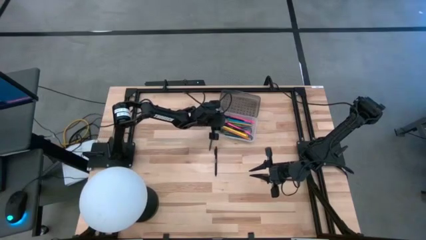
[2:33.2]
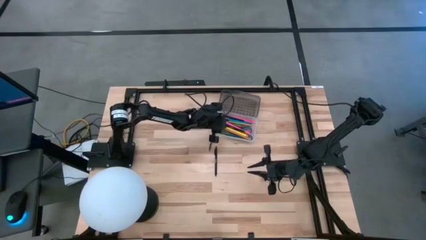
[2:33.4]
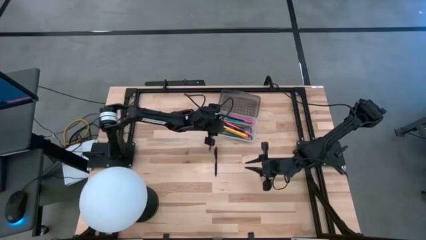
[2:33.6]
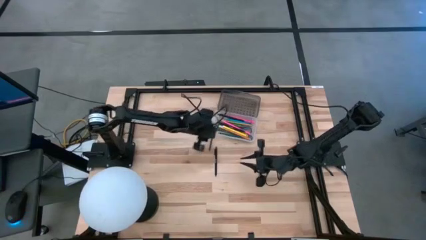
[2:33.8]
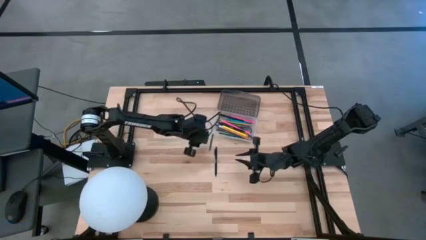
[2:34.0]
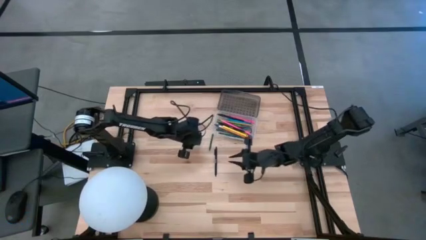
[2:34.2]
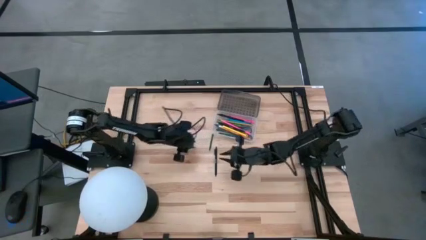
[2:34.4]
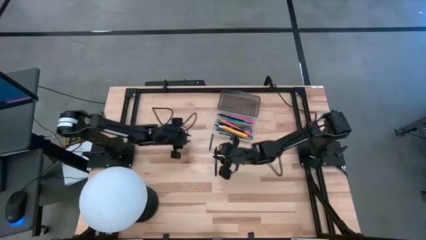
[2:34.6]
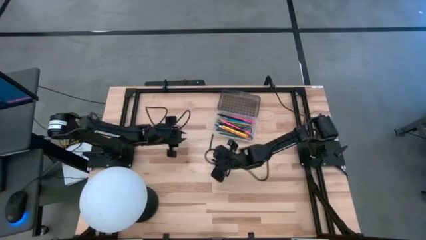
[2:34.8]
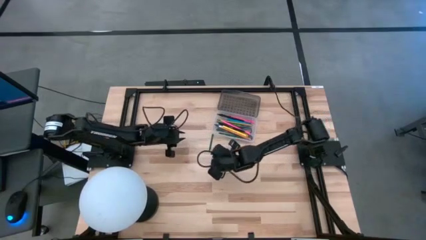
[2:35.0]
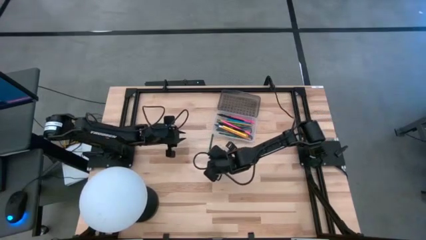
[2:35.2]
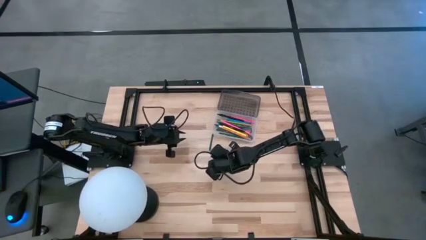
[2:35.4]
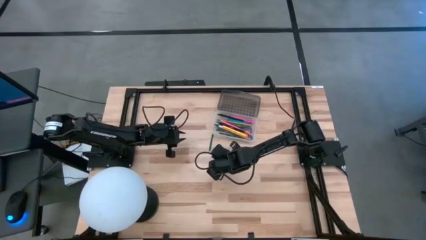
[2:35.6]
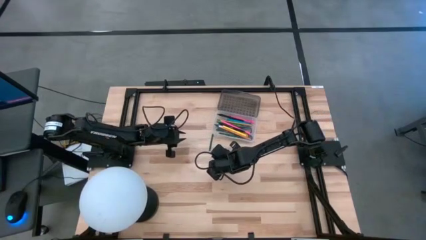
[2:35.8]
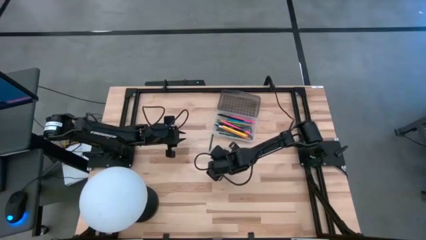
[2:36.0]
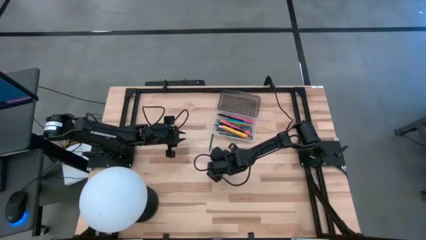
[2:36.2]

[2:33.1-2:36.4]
Task: Pick & place school supplies into a supply box
Put the black pen into the black supply box

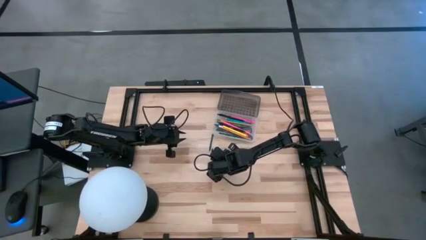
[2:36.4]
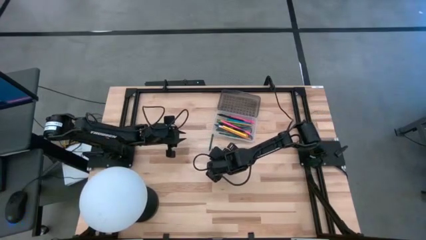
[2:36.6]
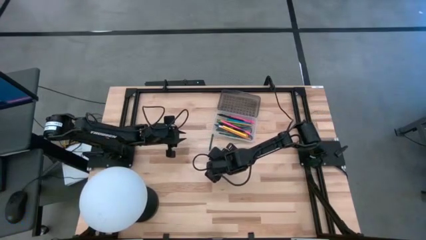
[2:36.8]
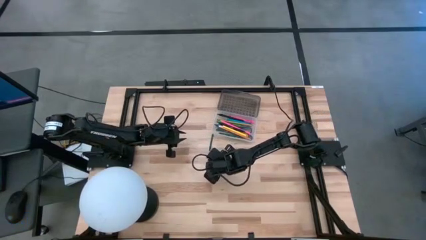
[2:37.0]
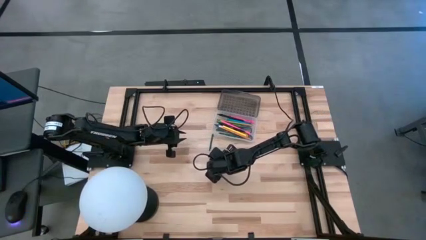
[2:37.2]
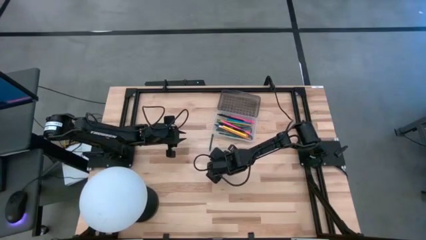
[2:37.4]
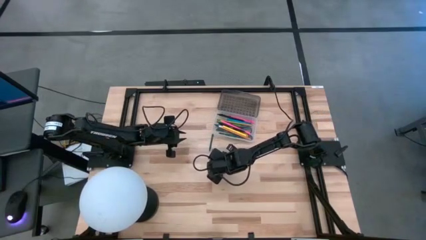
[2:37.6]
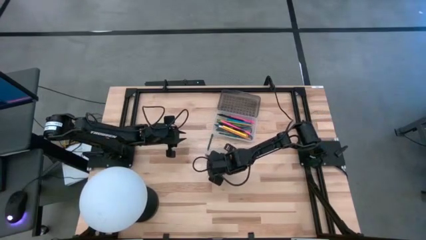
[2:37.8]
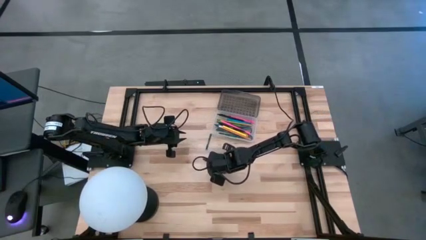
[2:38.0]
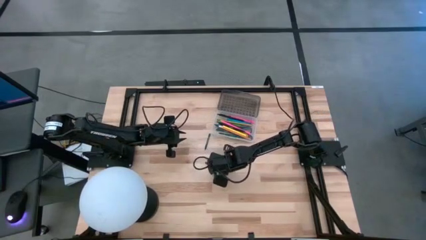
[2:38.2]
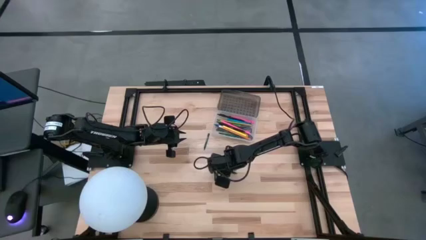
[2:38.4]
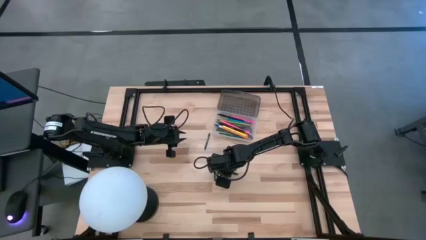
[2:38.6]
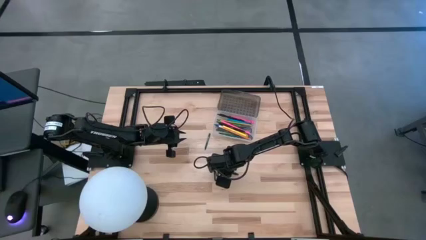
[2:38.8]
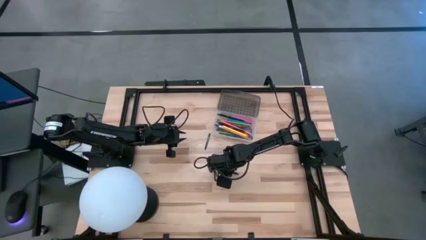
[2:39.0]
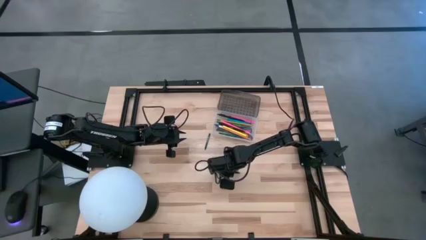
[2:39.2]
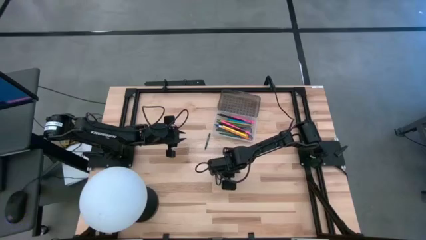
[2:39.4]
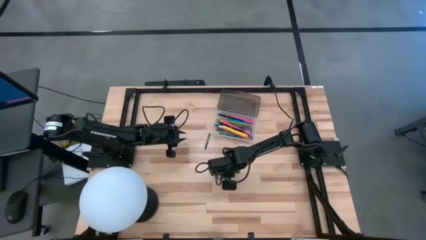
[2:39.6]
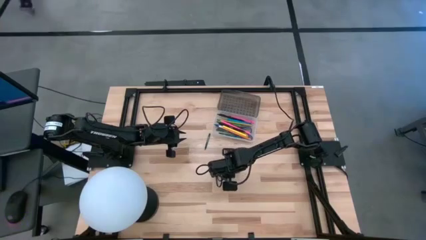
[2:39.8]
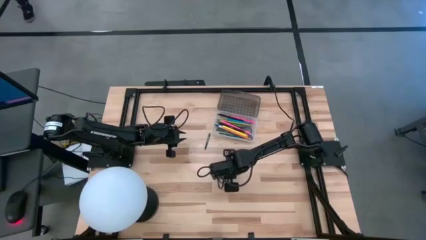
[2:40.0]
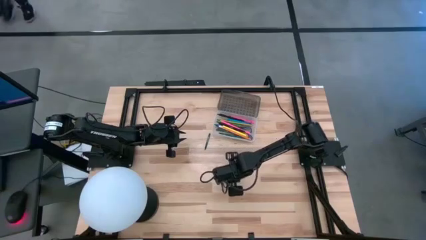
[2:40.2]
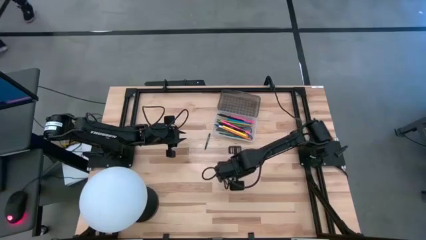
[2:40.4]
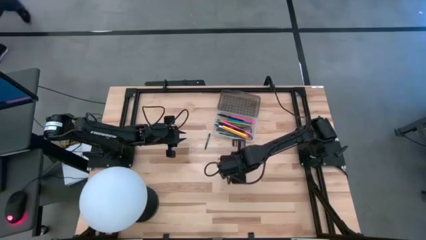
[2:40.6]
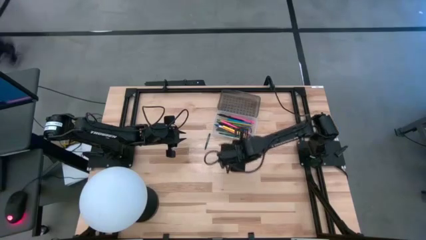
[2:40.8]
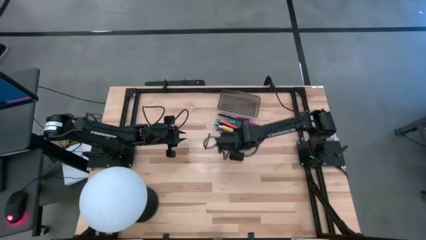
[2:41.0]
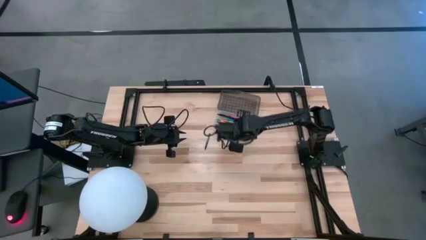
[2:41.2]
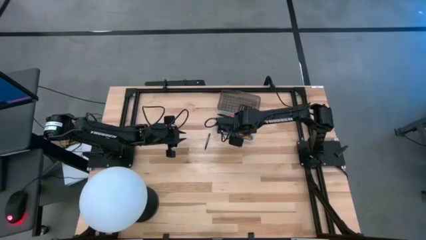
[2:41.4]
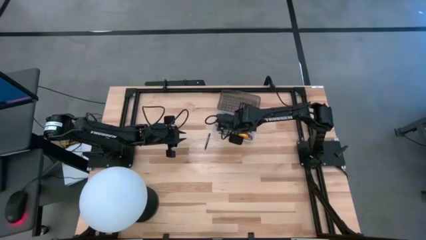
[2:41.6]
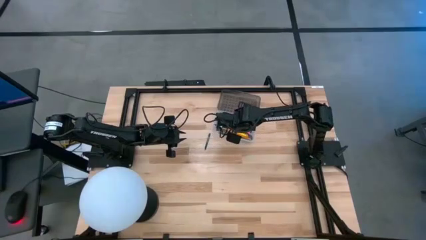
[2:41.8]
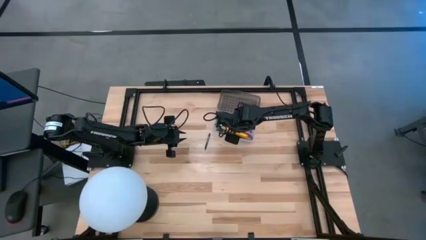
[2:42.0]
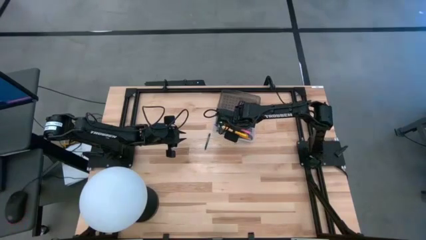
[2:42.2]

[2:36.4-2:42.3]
Put the black pen into the black supply box

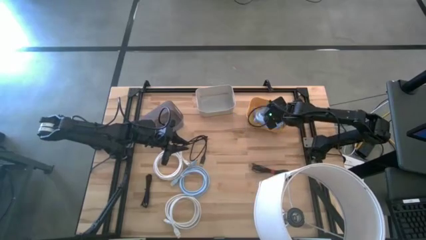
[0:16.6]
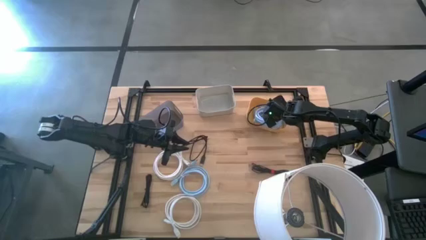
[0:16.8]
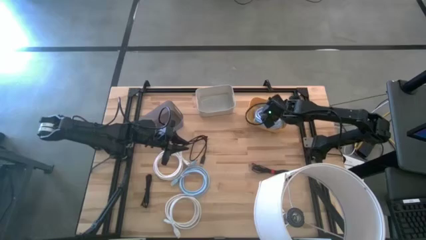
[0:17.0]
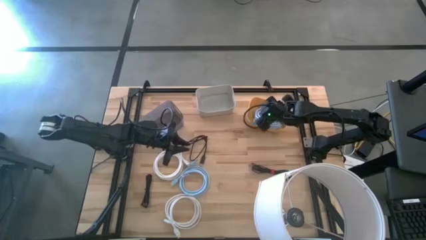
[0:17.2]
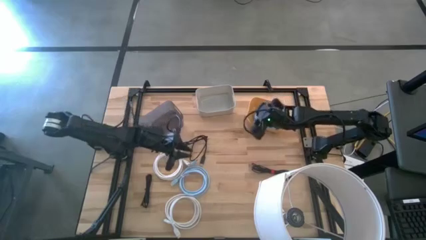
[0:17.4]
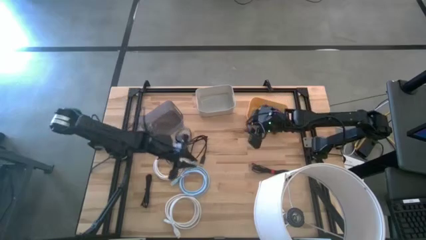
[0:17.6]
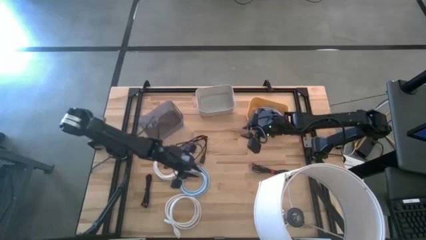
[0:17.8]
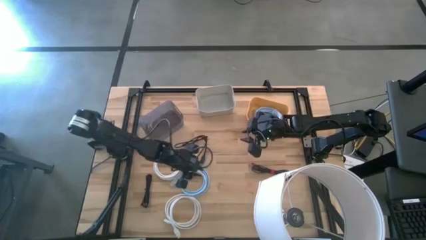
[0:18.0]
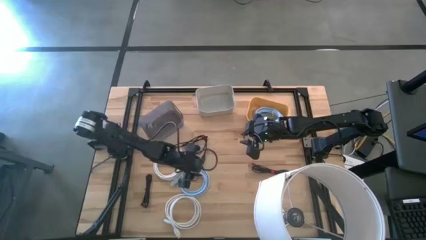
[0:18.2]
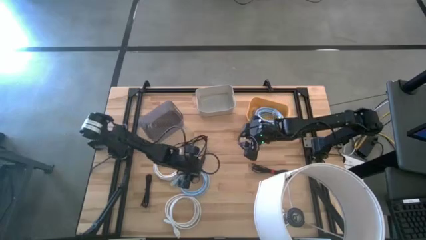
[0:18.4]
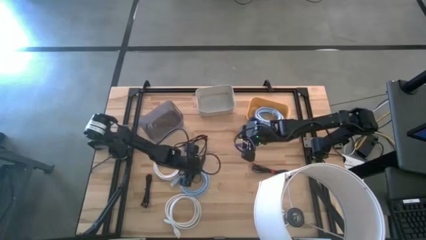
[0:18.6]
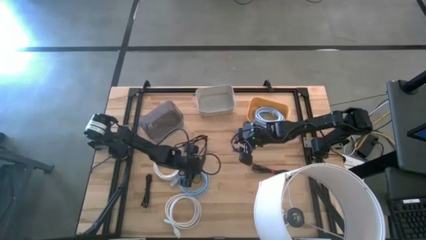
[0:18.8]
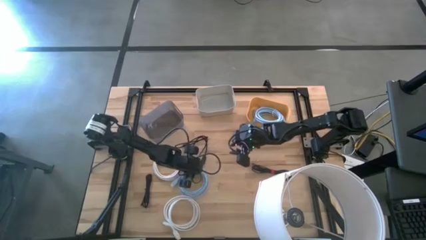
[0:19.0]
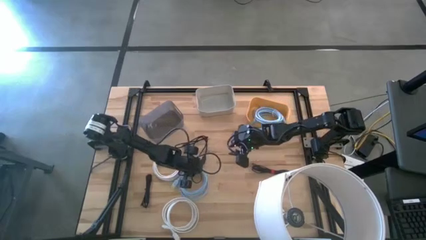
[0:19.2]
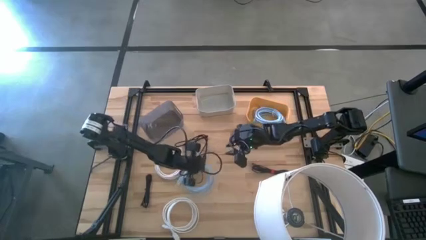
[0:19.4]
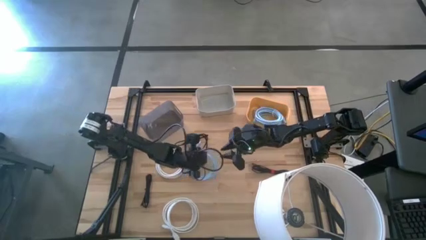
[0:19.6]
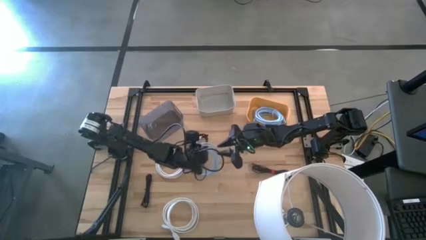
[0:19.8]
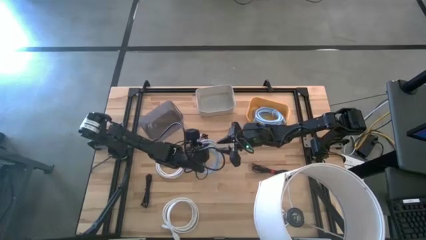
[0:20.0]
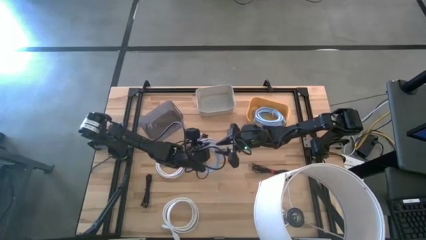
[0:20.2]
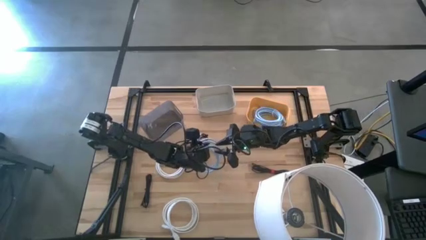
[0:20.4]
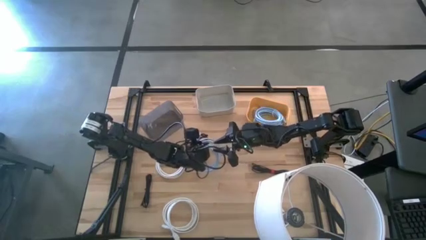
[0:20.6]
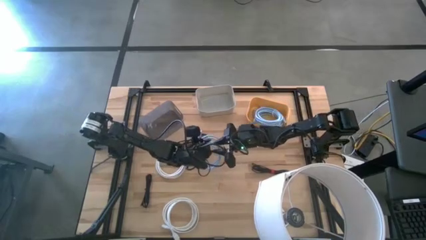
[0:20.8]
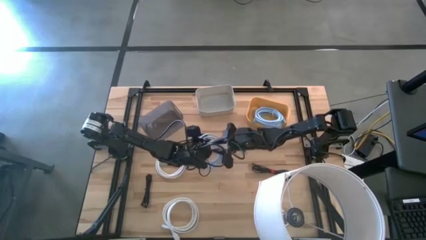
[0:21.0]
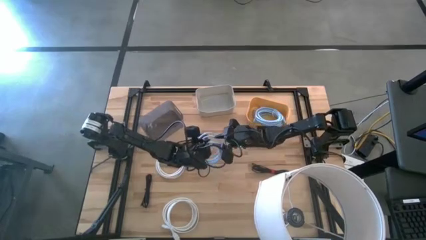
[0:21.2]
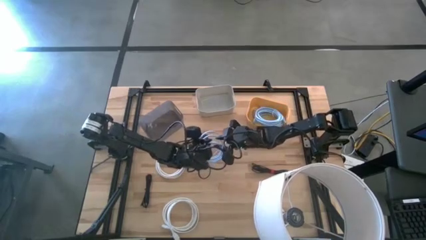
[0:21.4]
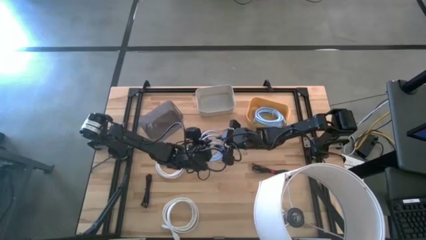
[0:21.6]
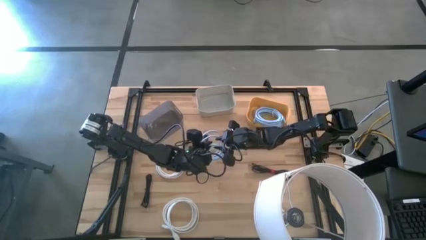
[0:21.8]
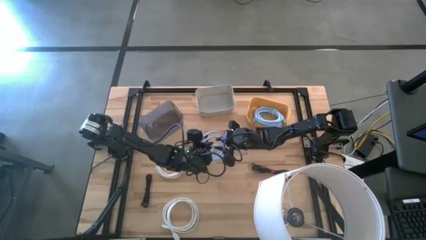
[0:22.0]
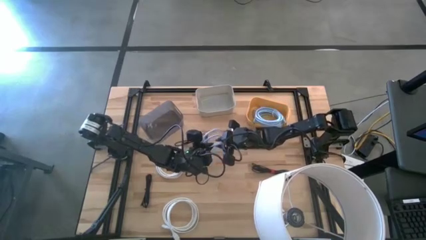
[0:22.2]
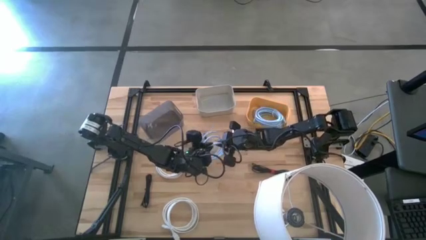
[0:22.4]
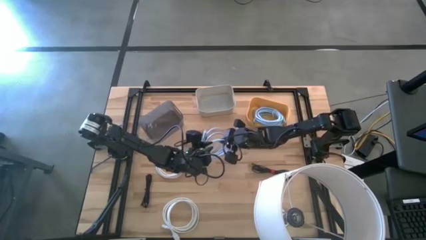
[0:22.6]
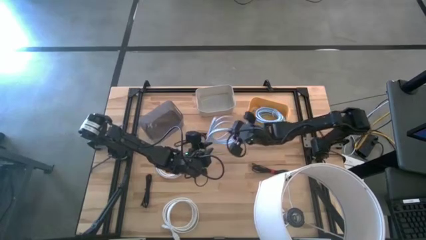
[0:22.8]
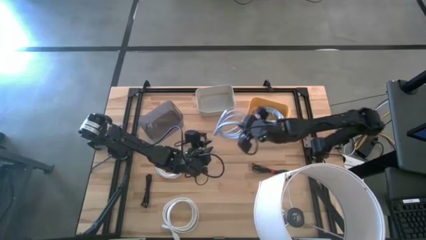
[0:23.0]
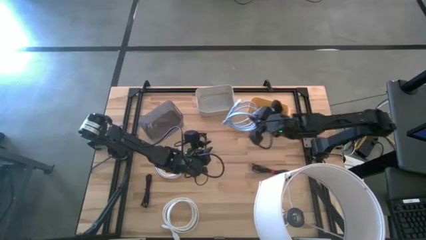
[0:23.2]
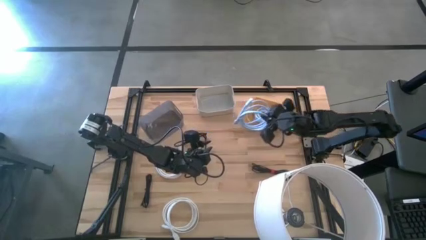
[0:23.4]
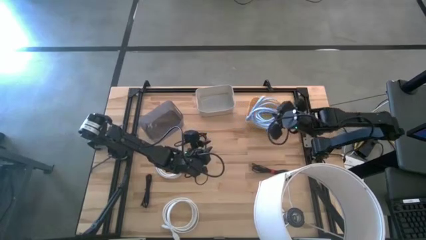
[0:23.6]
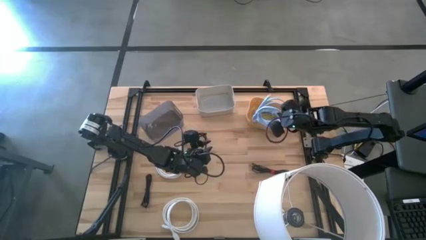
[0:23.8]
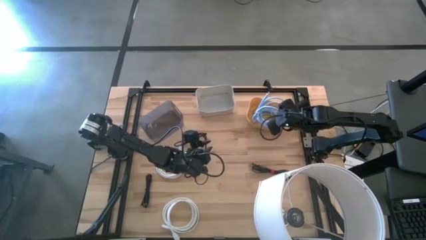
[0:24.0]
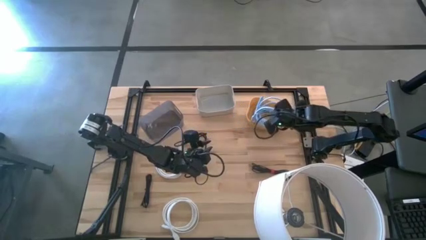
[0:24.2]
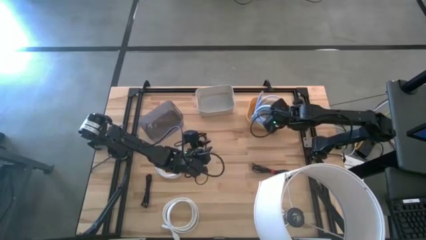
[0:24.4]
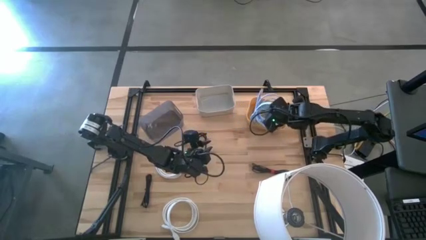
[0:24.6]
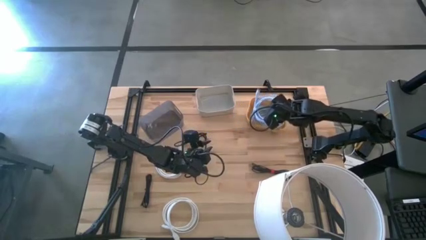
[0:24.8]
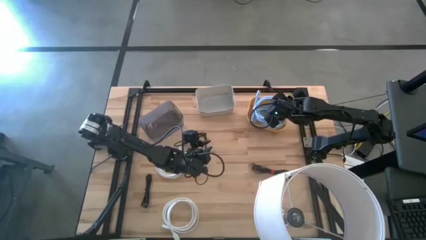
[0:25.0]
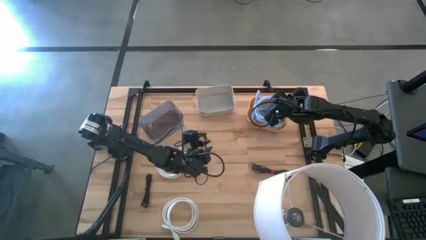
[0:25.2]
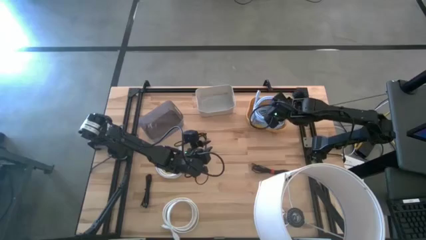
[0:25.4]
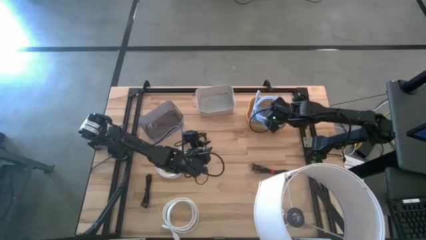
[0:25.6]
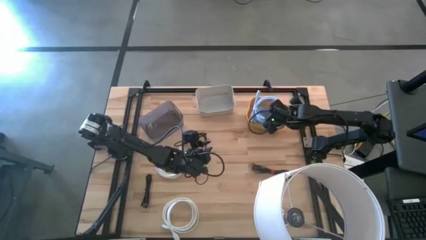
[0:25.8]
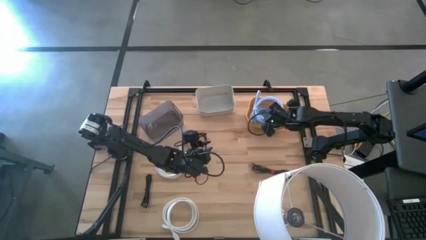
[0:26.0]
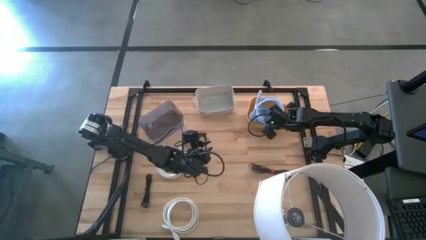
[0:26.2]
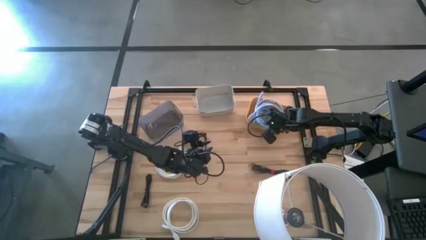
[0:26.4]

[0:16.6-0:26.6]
Task: Pick & Place USB Port
Put the blue hdmi cable into the yellow bin
